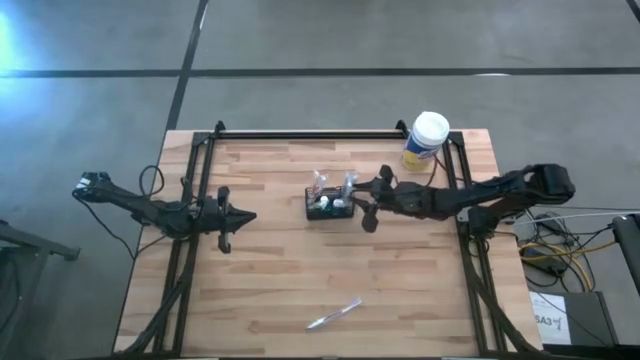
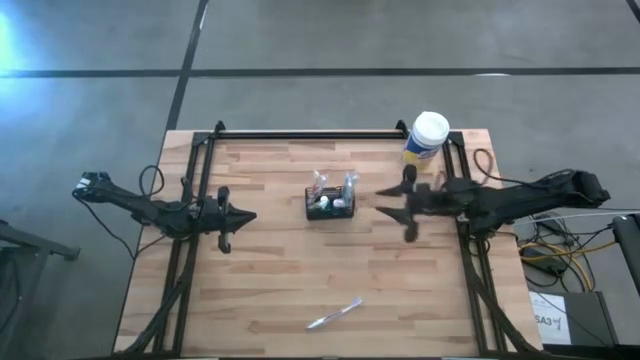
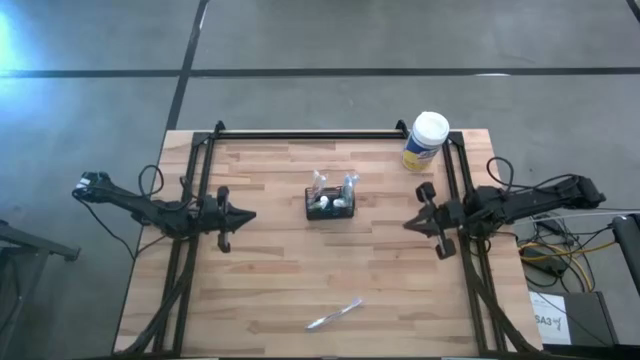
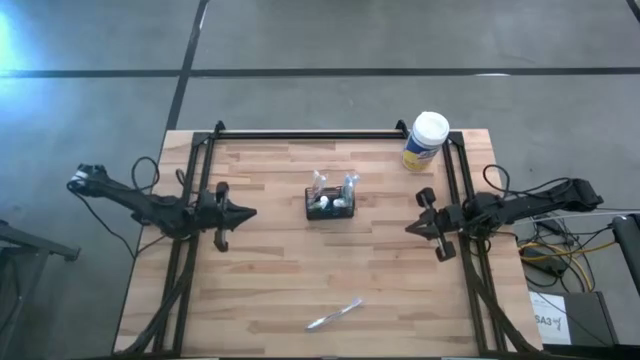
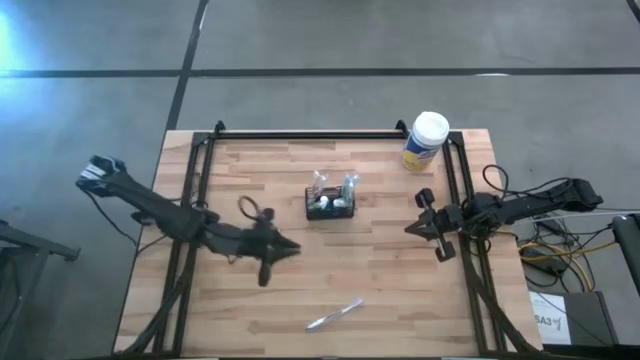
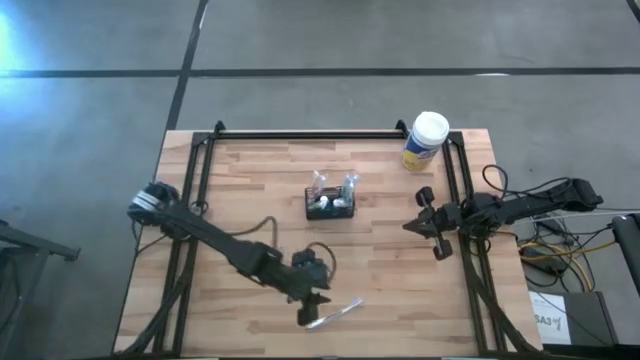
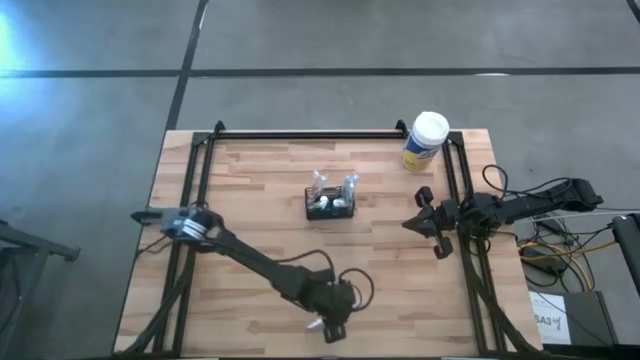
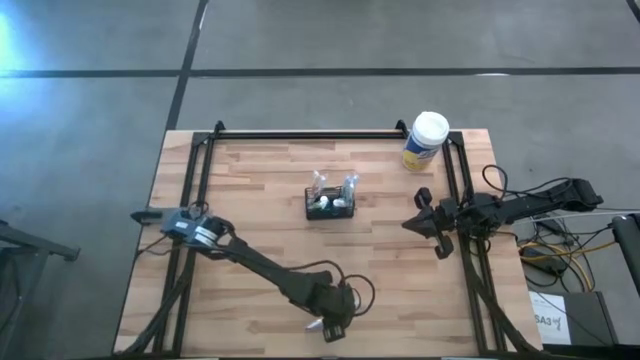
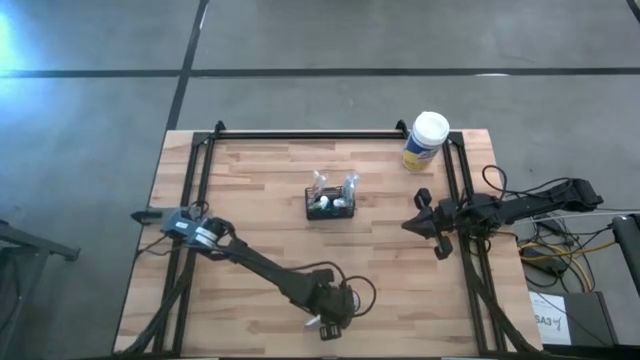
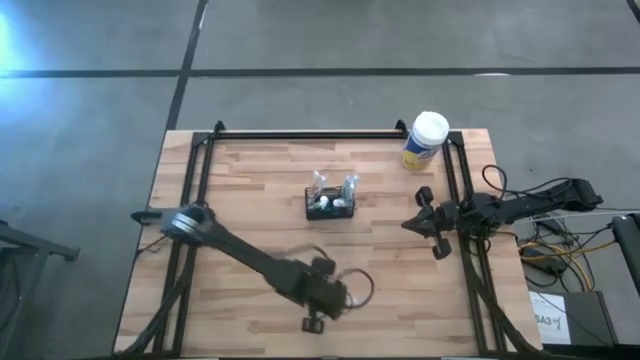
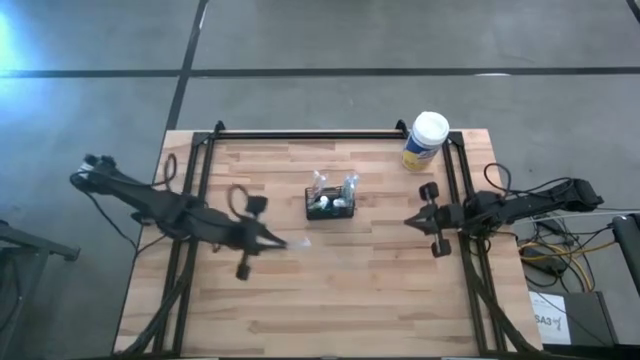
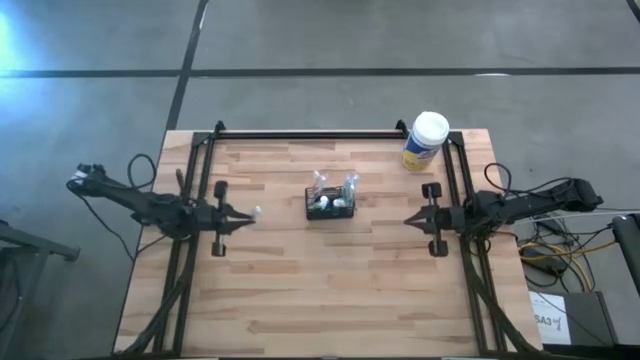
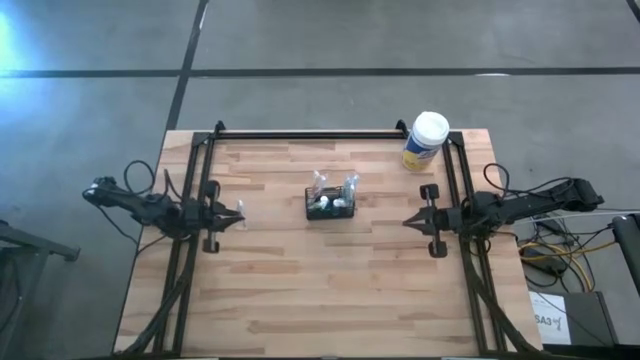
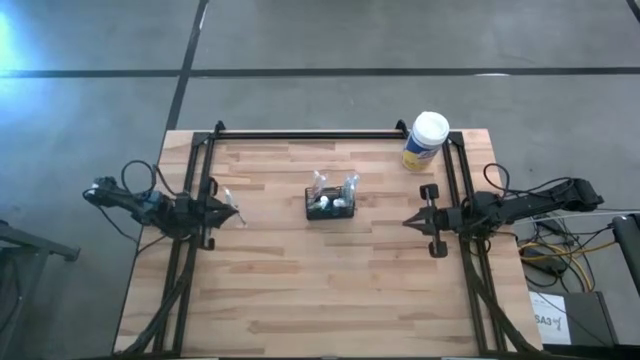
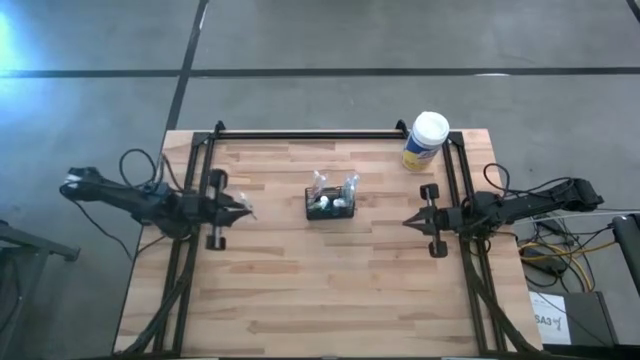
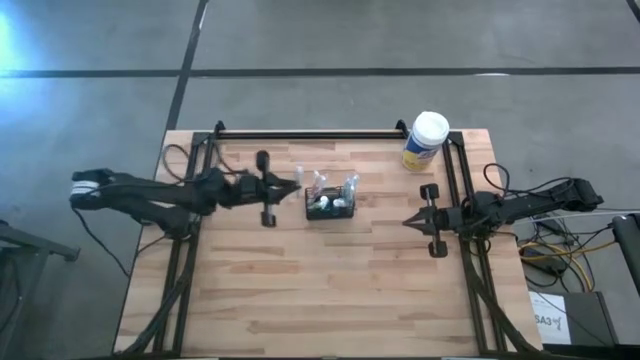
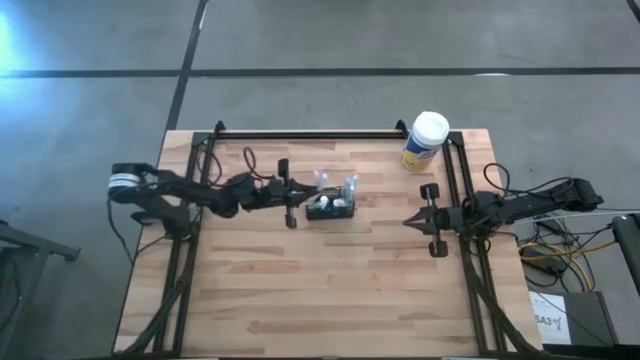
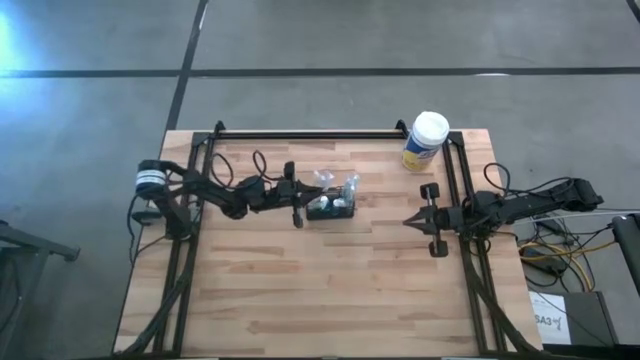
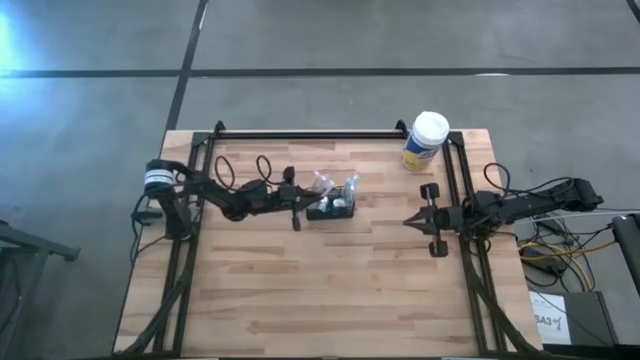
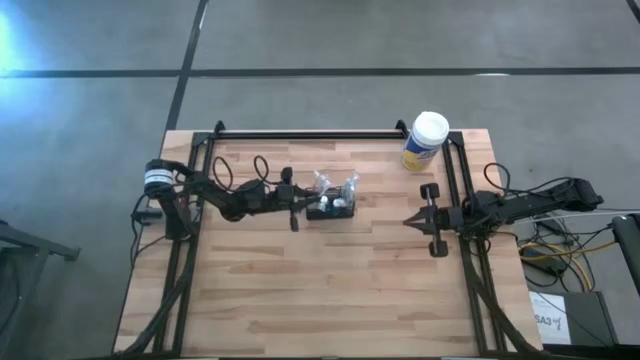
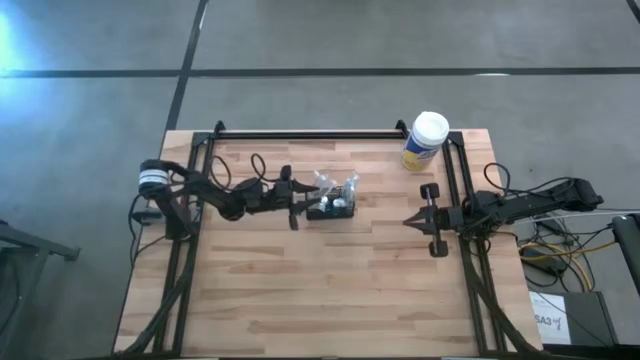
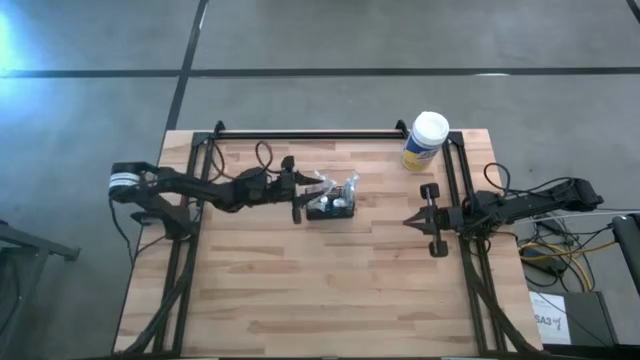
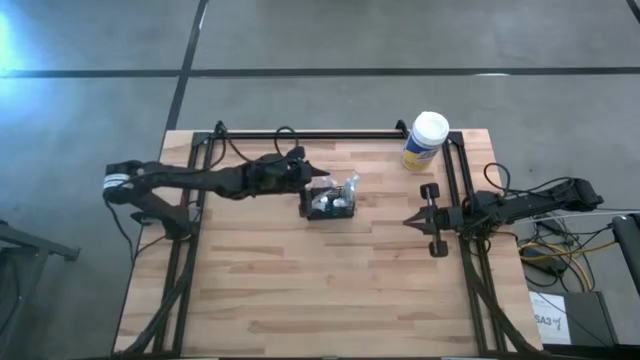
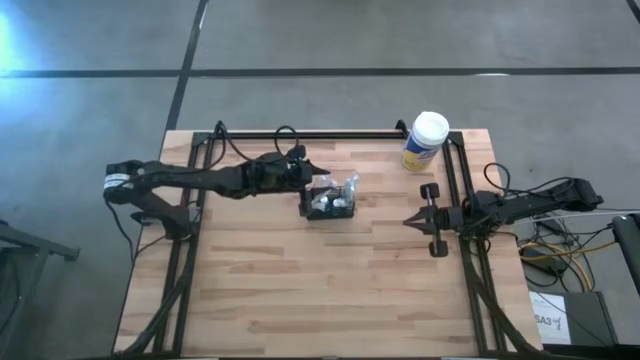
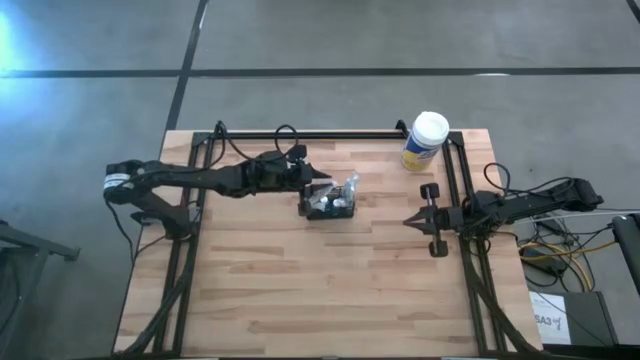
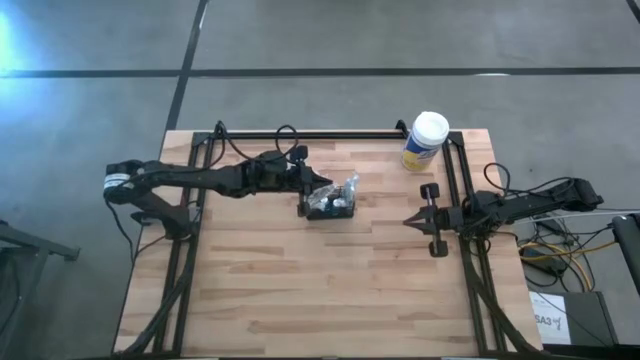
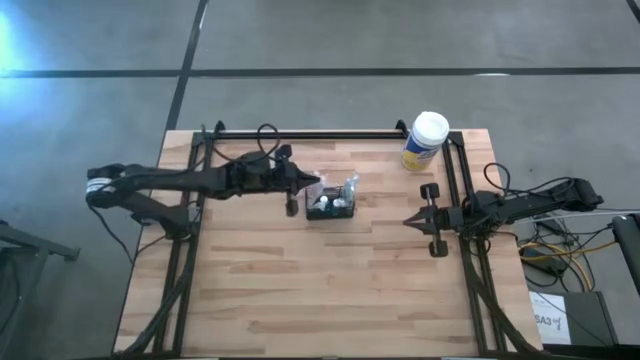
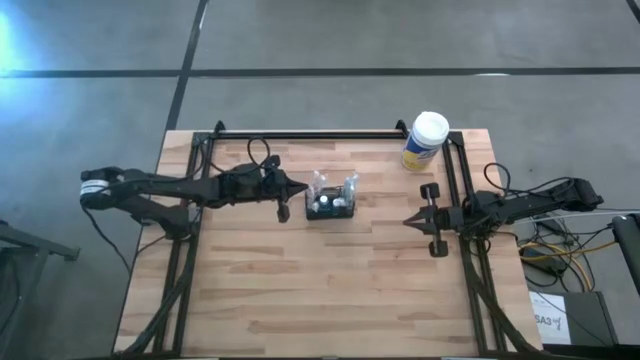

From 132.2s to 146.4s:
Task: Pick & Place toothbrushing station
Put the violet toothbrush in the wire organizer

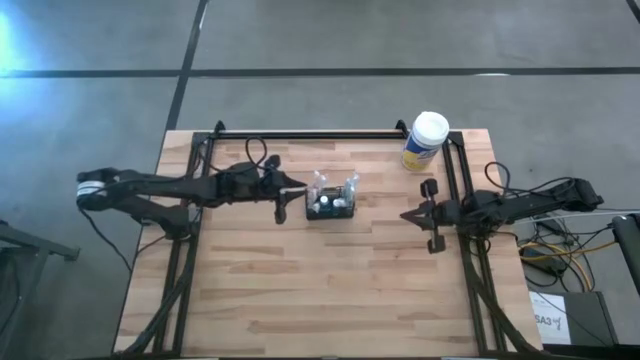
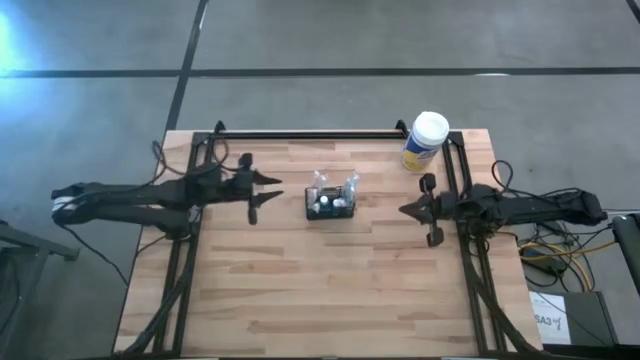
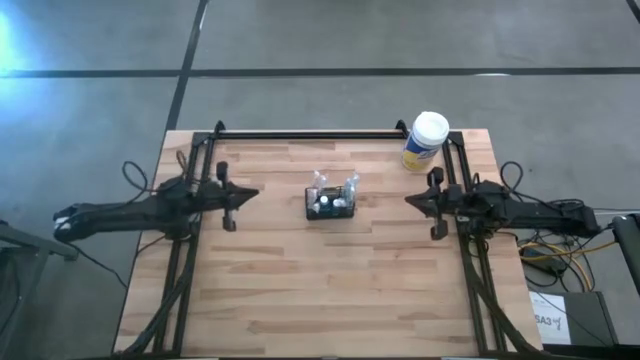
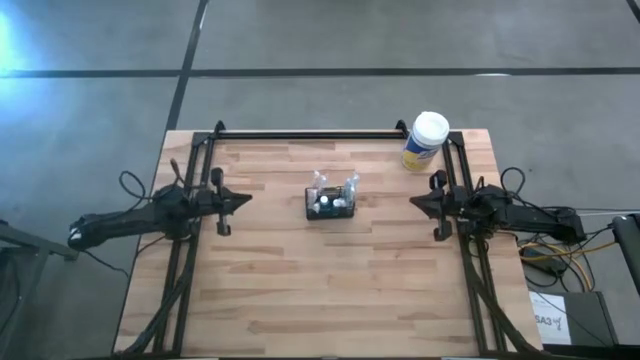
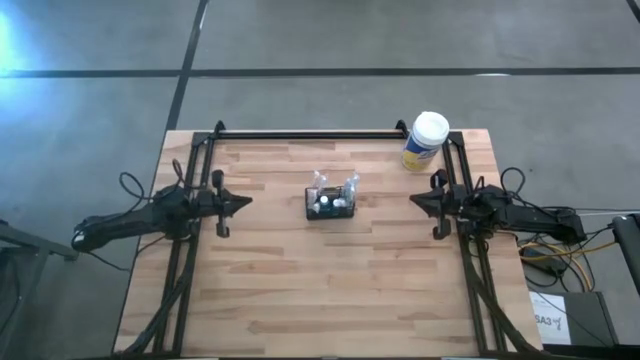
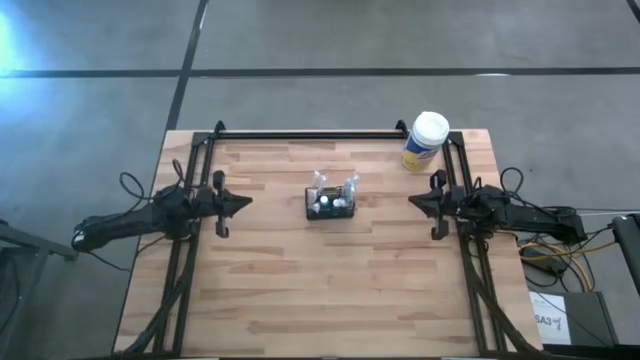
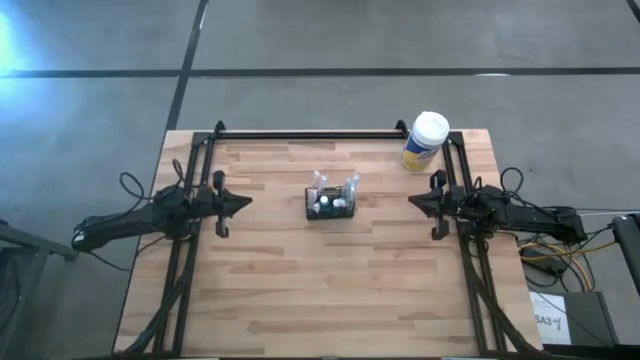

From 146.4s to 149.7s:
Return to Home Position

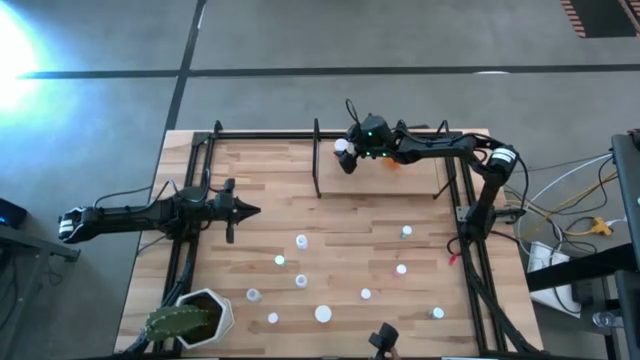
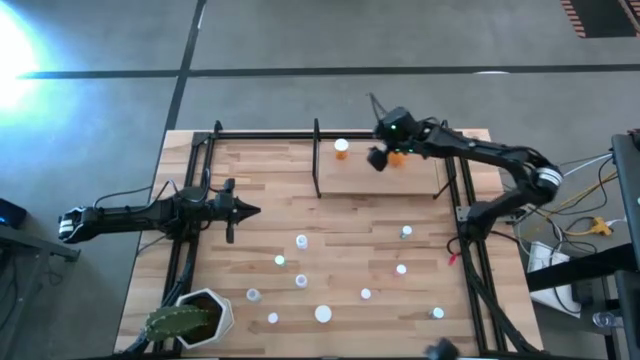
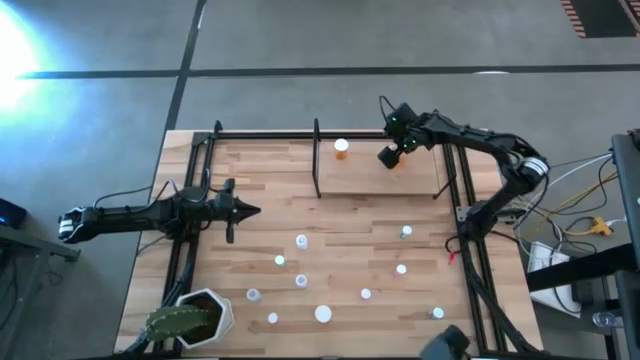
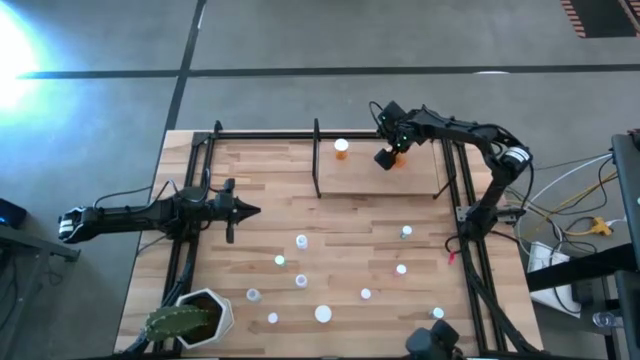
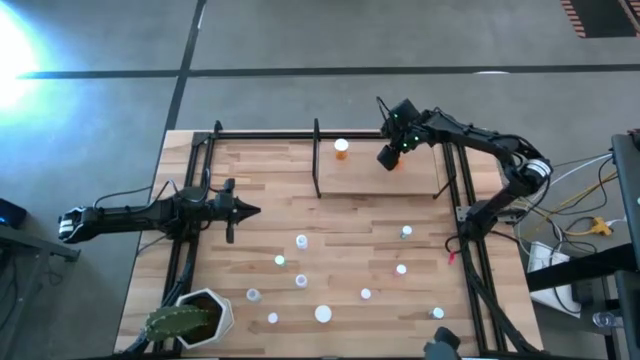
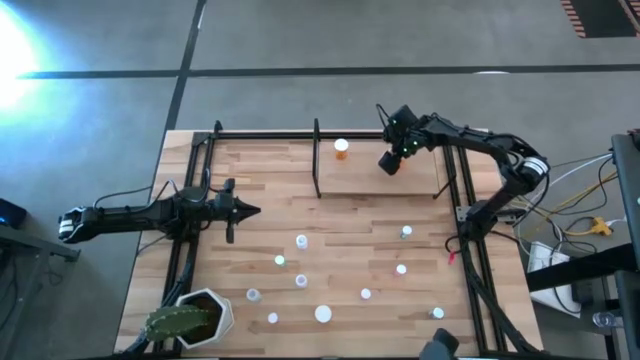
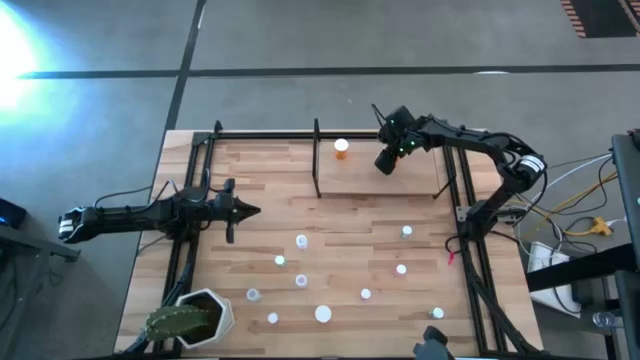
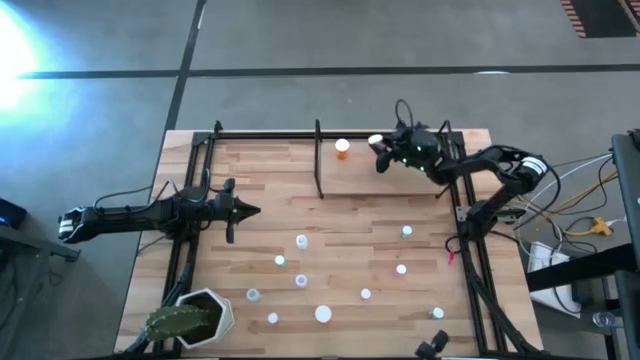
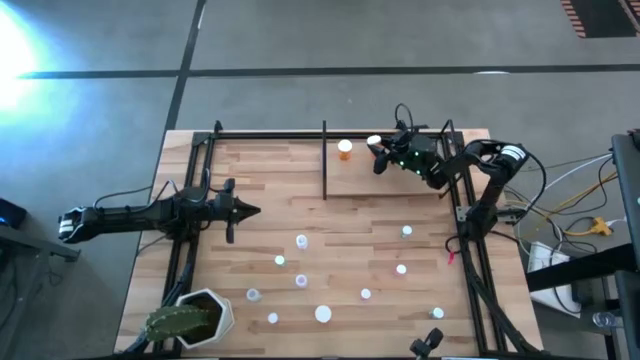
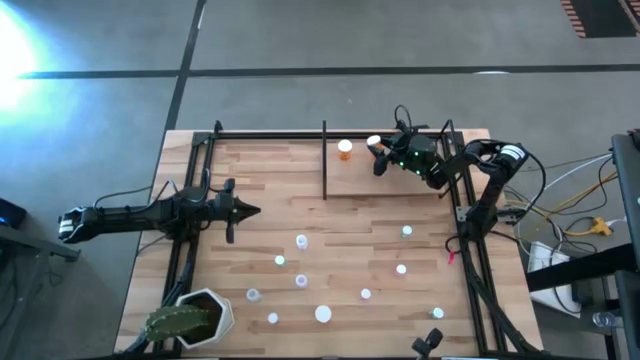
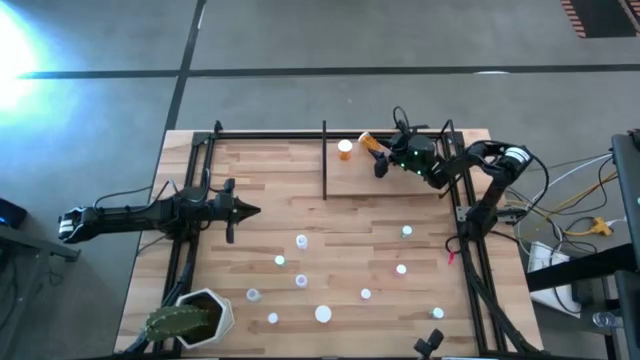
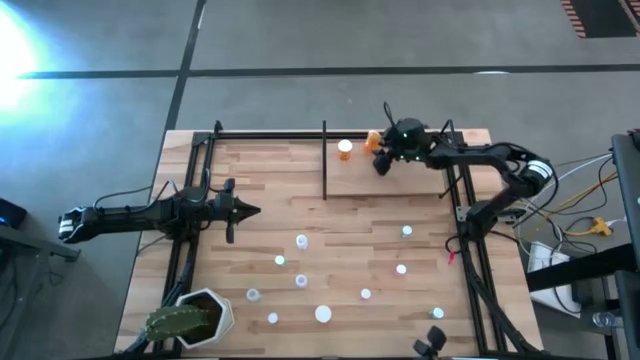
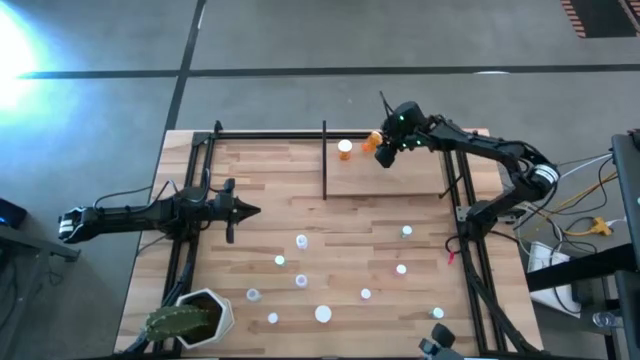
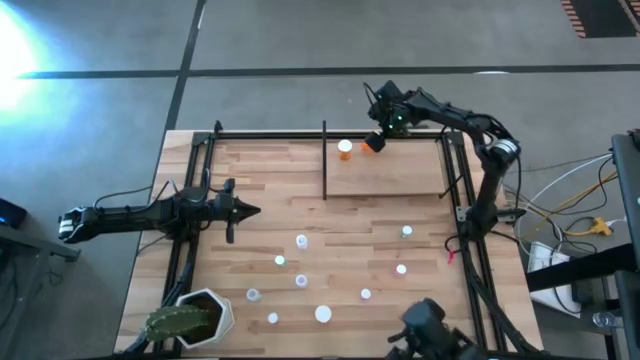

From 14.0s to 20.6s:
Task: Pick and place medicine bottles onto shelf by color
Adjust the orange pill bottle on the shelf
